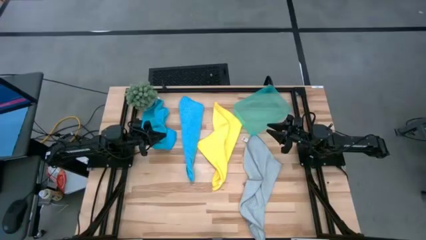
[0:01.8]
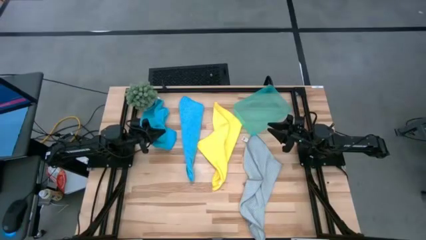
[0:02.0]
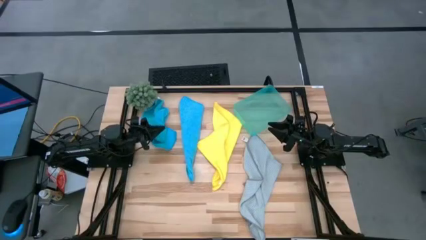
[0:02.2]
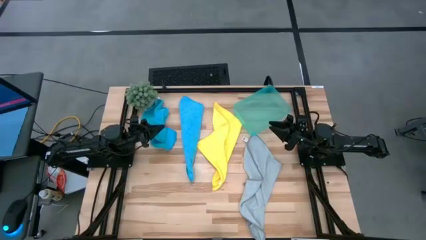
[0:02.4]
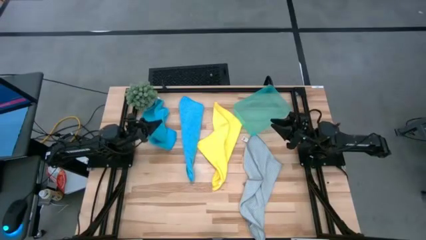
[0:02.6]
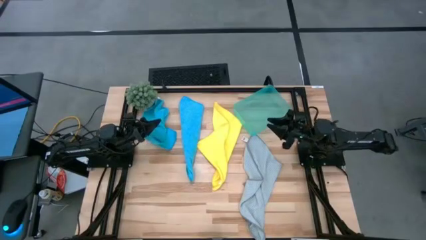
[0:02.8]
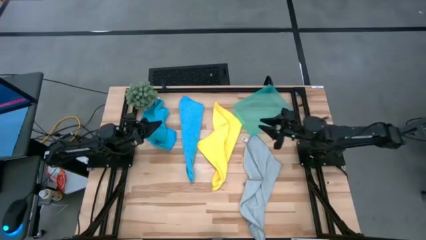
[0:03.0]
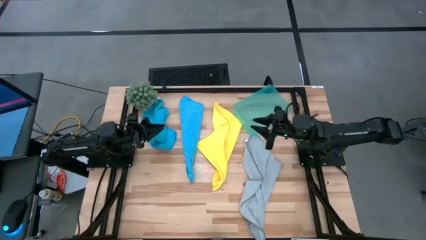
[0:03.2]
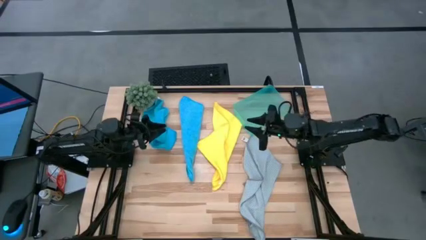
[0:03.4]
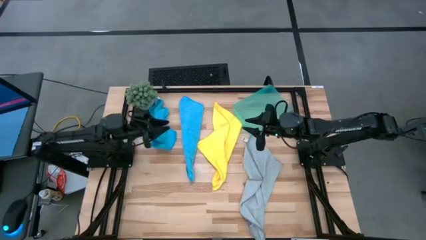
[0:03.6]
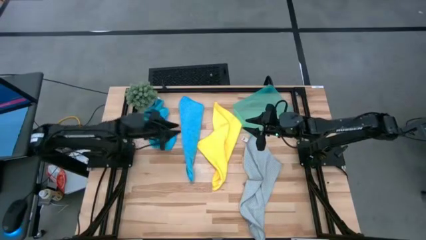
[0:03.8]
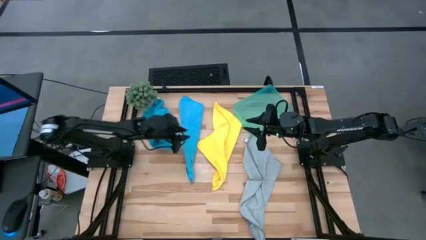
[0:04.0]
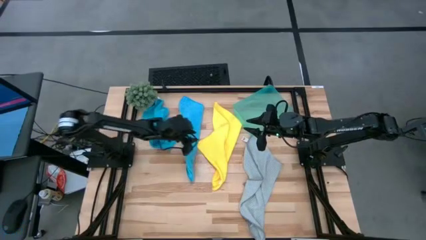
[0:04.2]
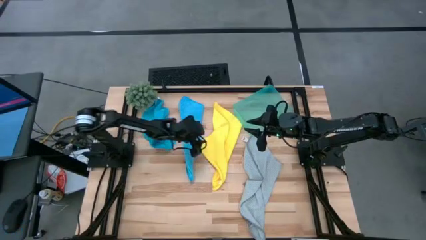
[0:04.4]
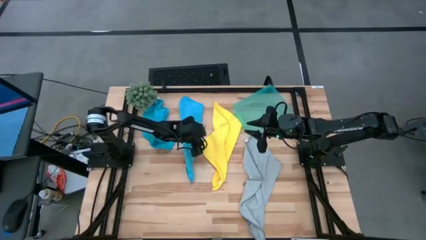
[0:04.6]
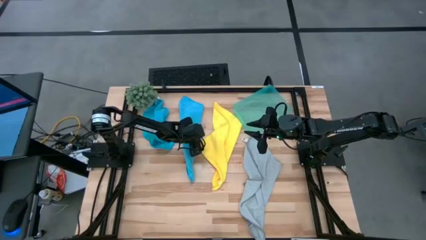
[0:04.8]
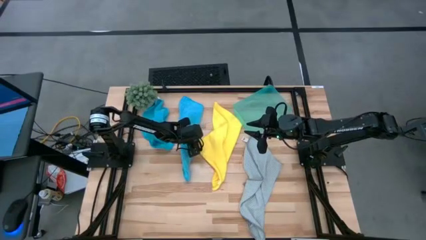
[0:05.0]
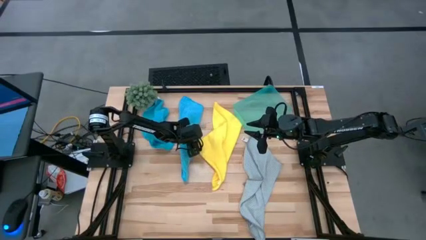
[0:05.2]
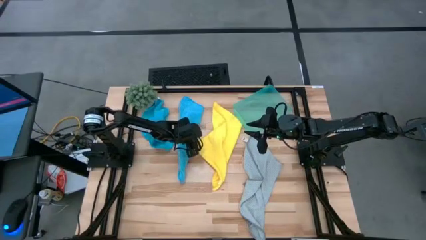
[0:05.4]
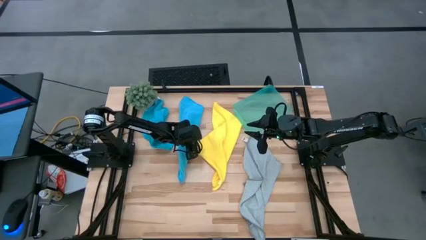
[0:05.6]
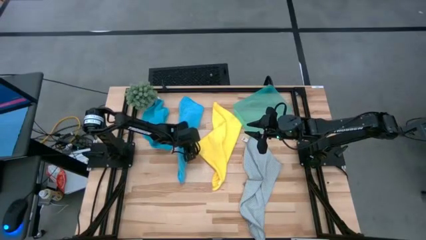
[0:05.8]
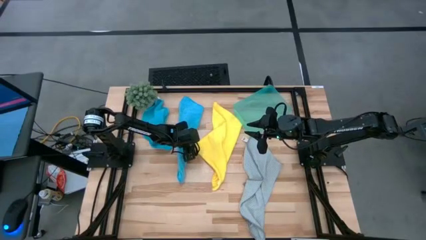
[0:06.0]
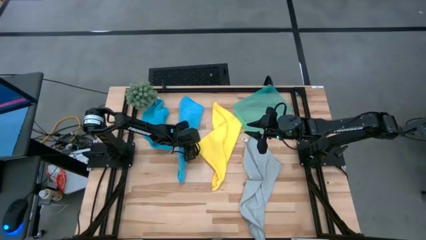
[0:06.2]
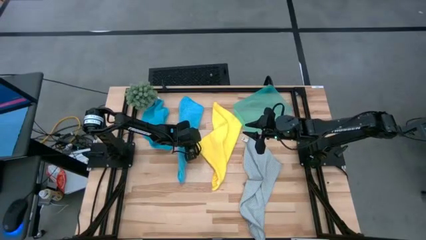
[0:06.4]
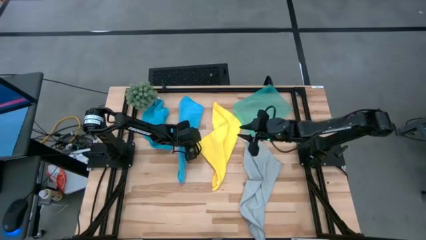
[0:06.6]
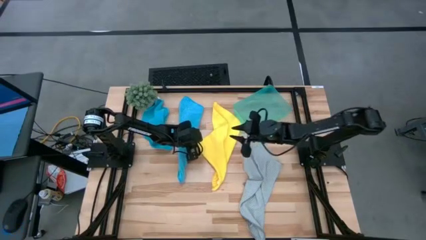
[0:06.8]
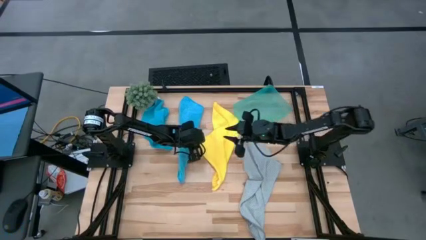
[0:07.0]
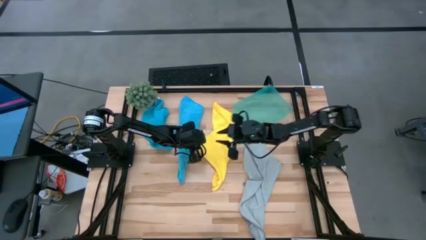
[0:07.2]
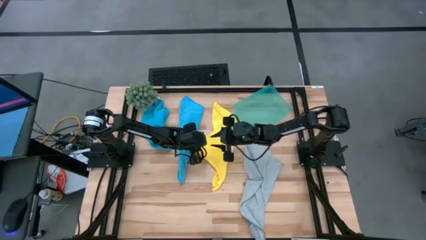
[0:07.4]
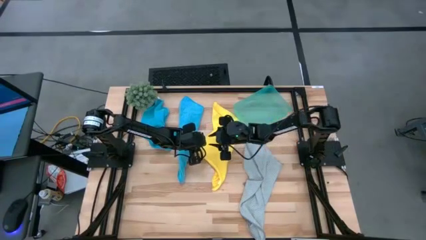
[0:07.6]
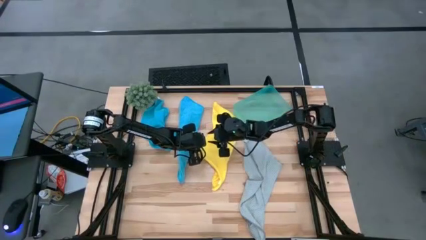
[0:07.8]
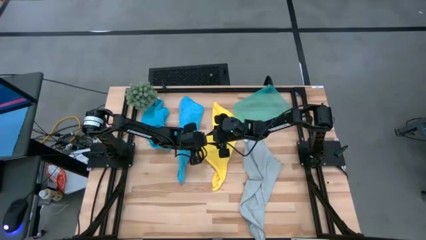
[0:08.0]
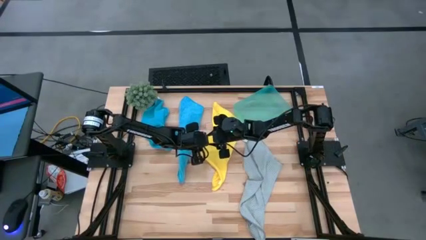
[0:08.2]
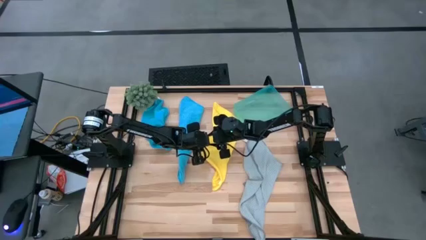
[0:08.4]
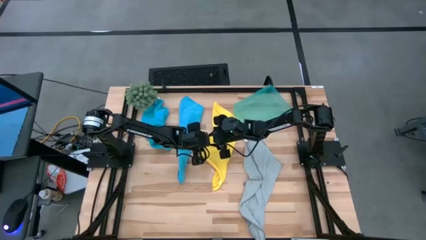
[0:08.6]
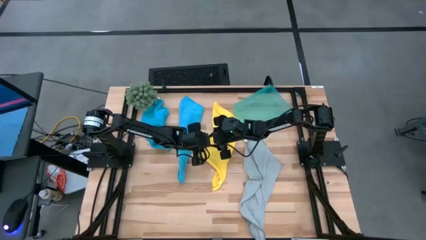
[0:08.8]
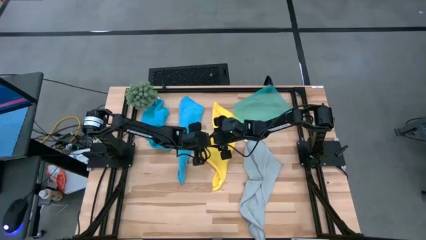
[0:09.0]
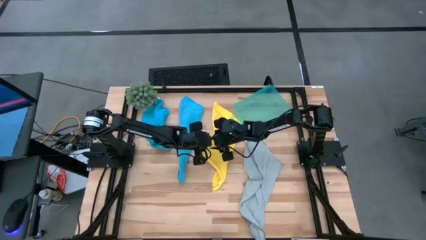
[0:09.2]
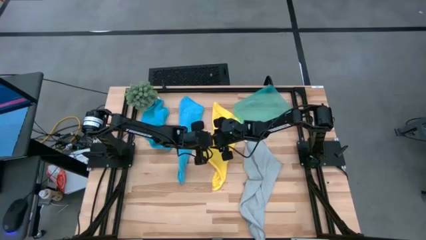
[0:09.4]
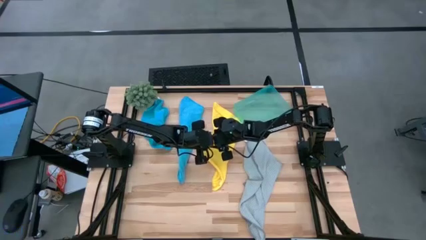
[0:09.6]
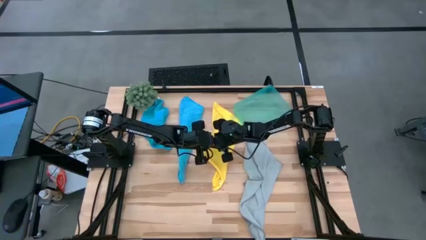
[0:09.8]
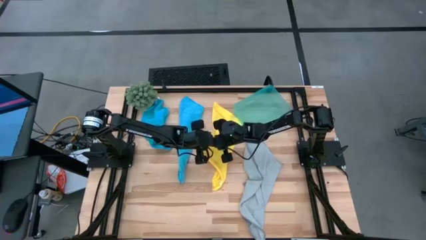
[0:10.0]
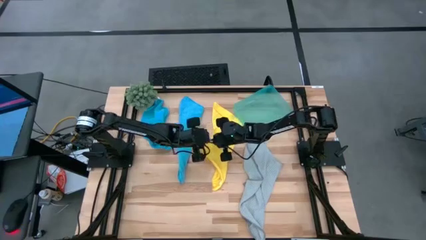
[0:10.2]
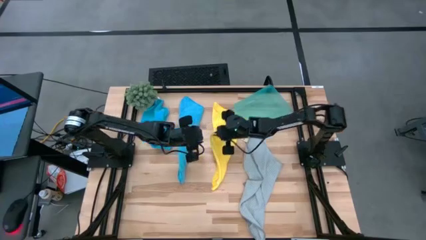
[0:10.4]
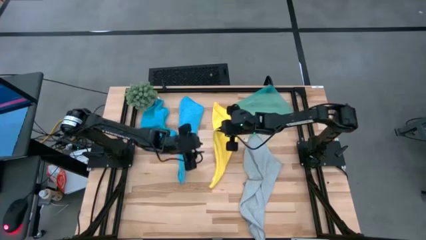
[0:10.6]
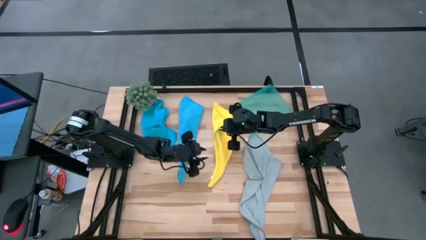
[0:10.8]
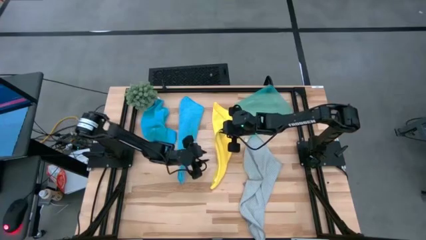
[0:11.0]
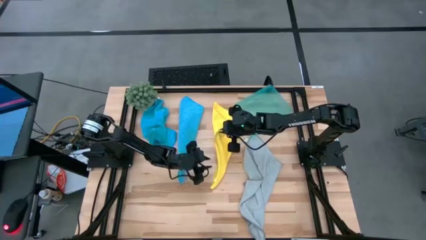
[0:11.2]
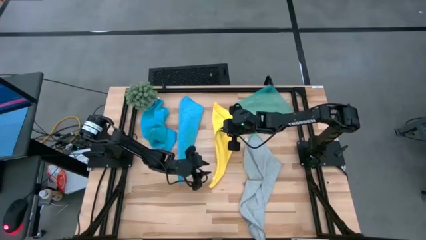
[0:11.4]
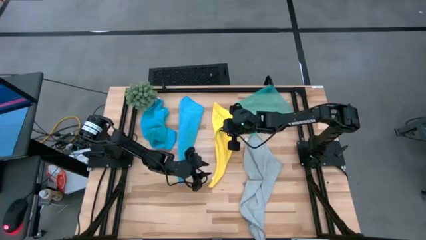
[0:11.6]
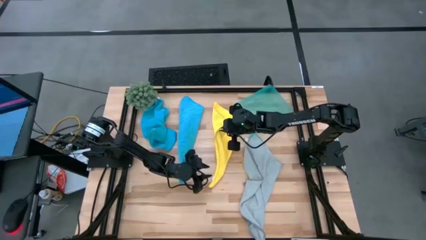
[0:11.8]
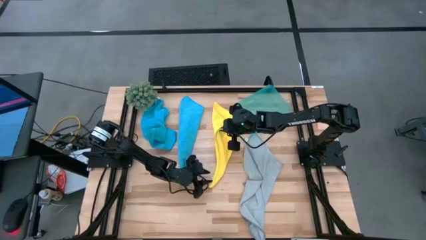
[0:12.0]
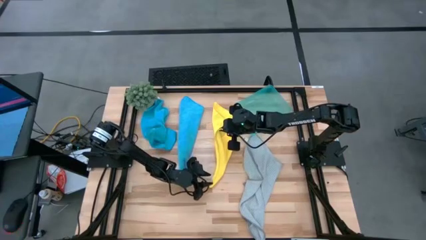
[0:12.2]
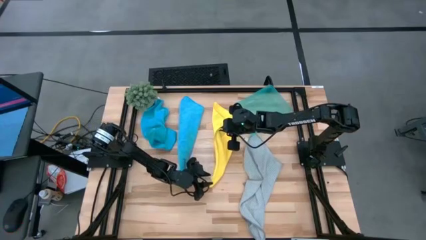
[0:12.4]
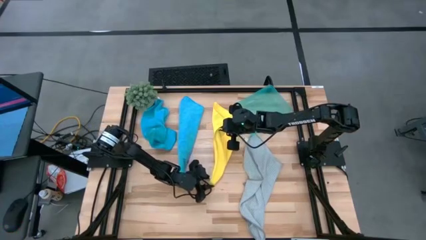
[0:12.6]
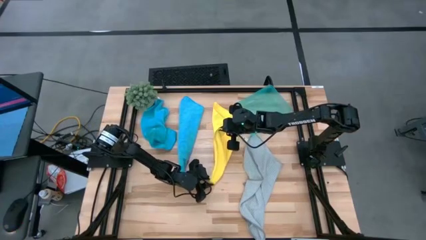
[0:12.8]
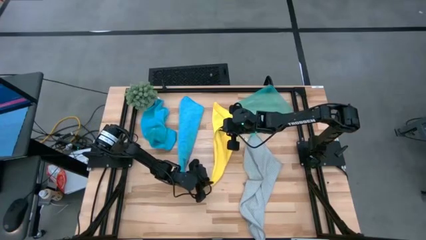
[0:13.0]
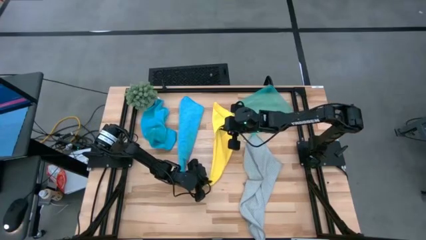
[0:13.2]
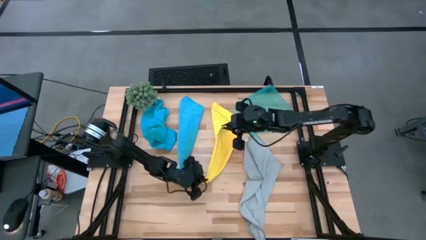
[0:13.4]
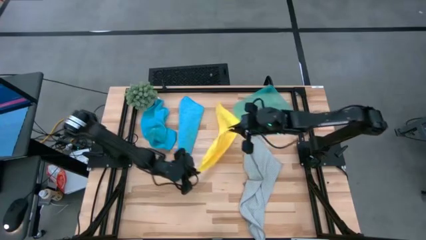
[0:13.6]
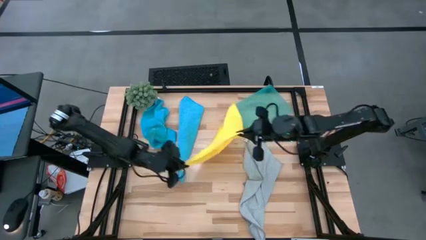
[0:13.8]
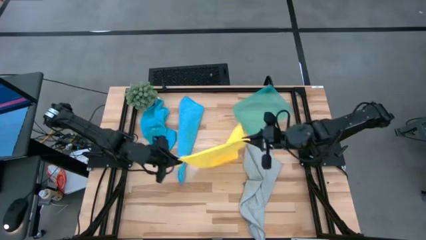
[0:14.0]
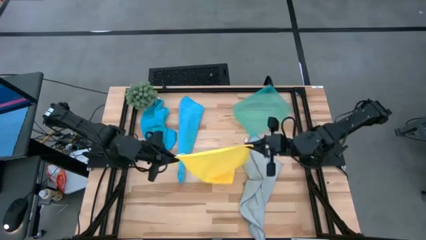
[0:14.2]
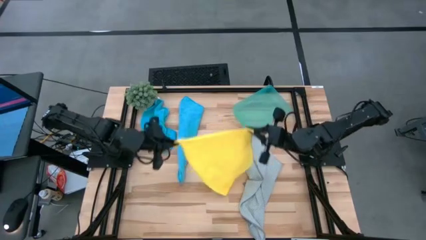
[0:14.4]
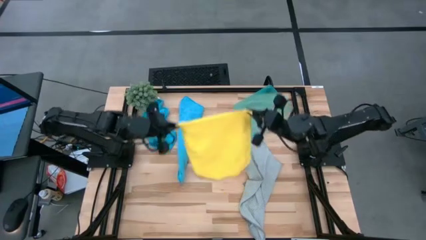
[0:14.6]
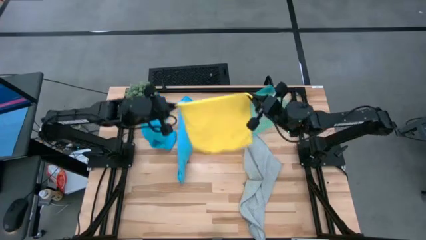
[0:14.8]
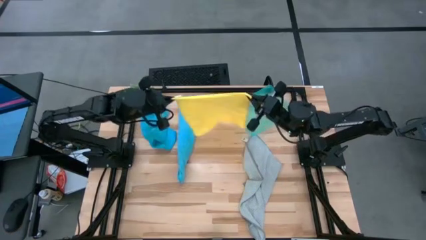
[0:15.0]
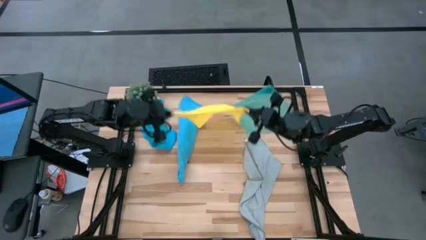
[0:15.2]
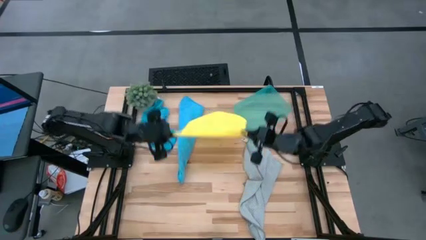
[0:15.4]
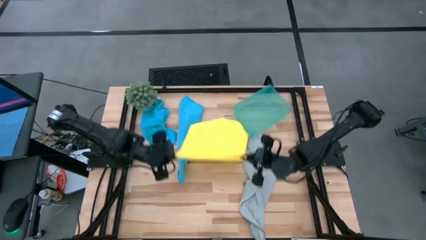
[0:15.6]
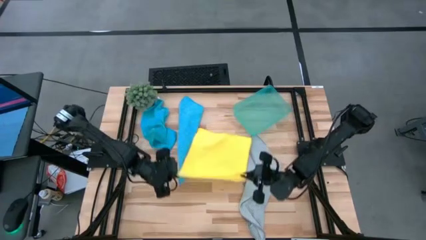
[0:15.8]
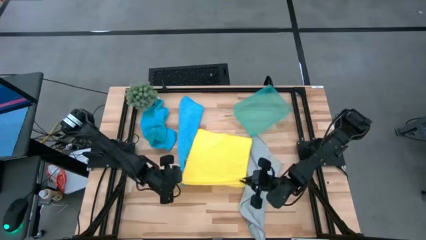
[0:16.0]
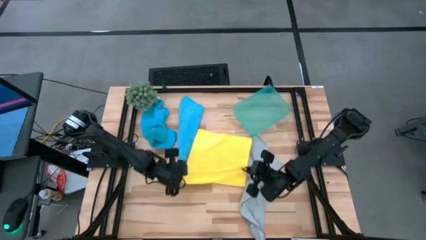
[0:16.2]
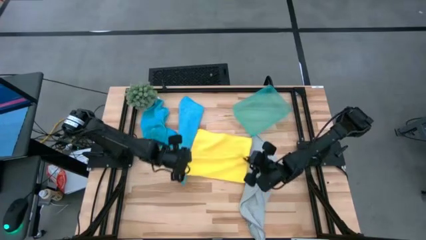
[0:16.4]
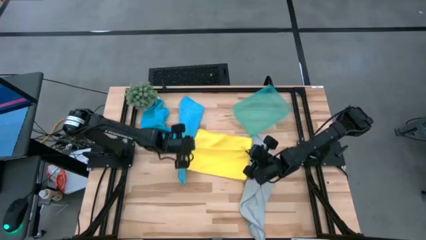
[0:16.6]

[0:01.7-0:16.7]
Task: Fold microfiber towels
Fold the yellow towel
